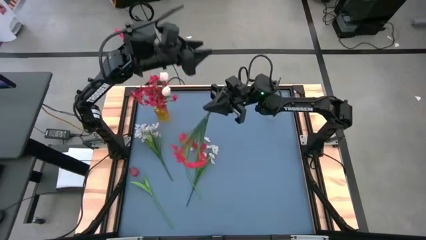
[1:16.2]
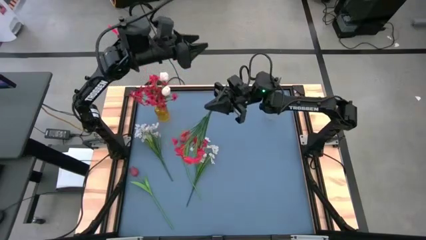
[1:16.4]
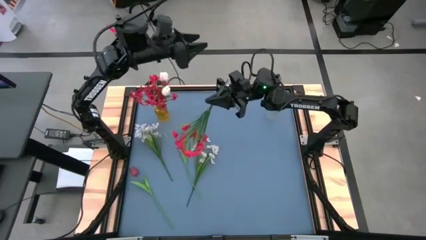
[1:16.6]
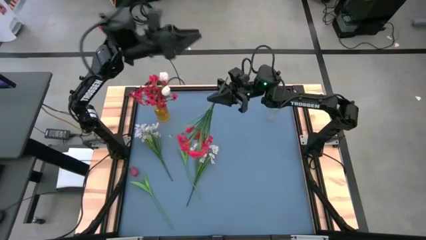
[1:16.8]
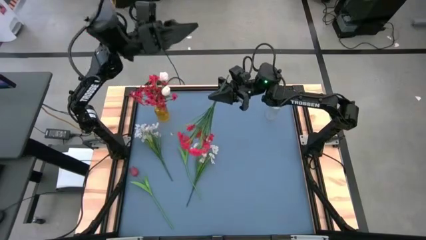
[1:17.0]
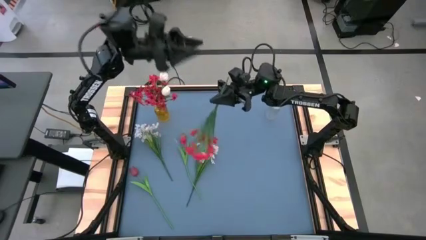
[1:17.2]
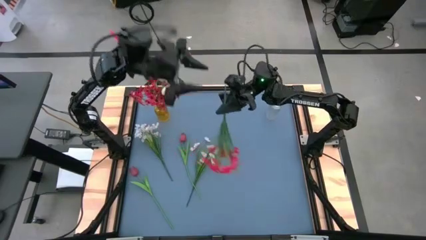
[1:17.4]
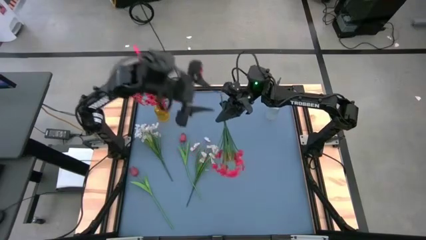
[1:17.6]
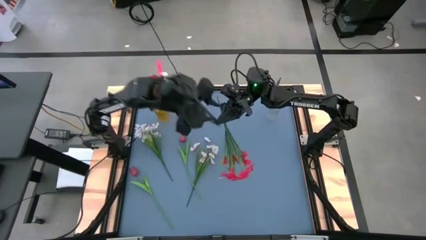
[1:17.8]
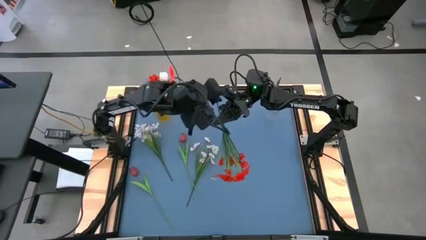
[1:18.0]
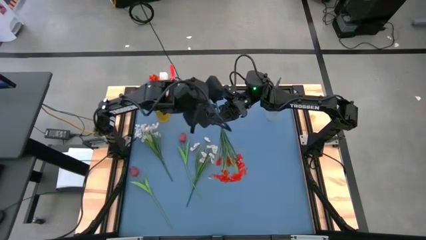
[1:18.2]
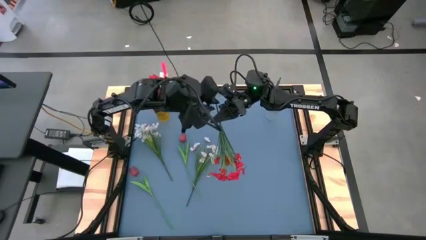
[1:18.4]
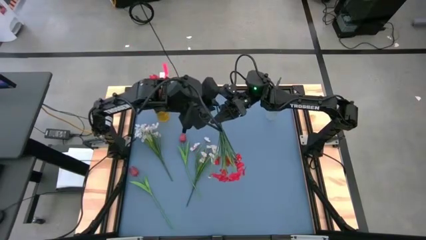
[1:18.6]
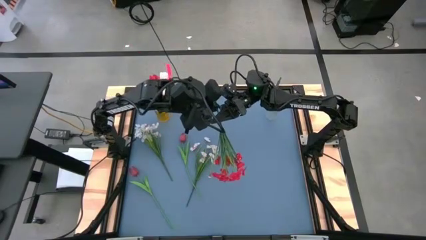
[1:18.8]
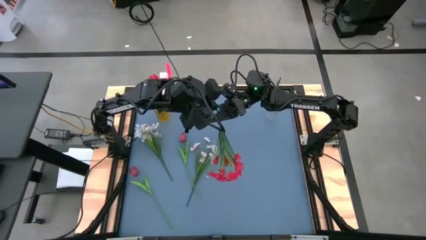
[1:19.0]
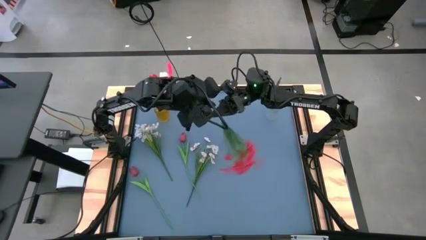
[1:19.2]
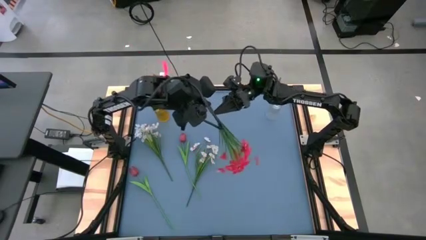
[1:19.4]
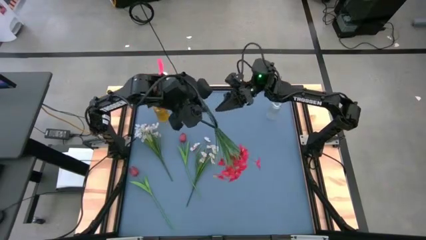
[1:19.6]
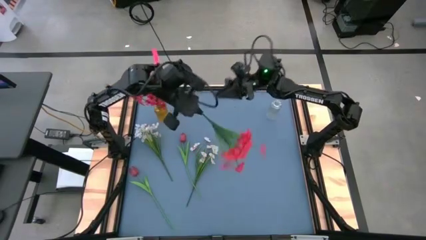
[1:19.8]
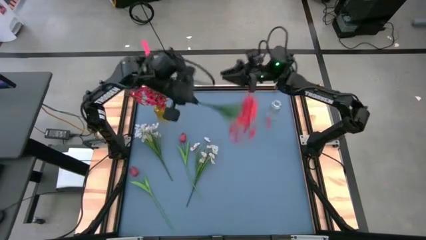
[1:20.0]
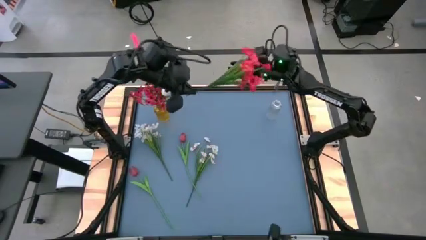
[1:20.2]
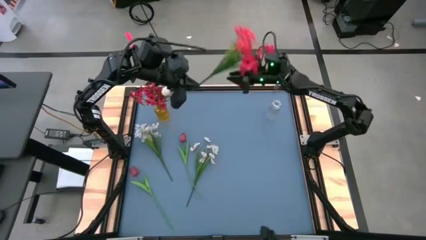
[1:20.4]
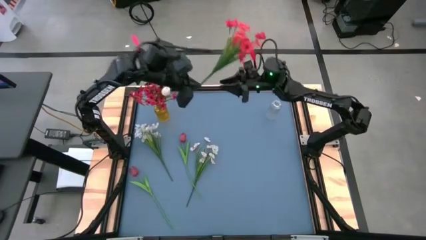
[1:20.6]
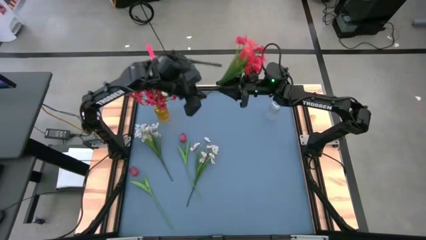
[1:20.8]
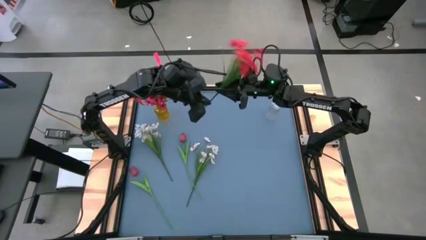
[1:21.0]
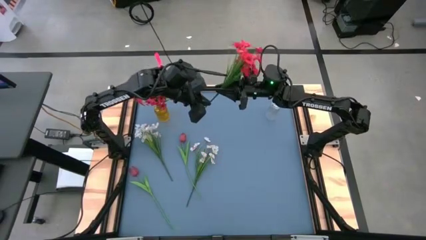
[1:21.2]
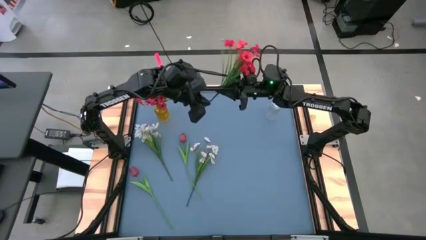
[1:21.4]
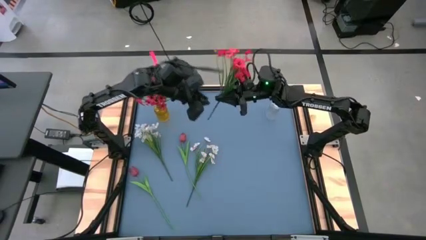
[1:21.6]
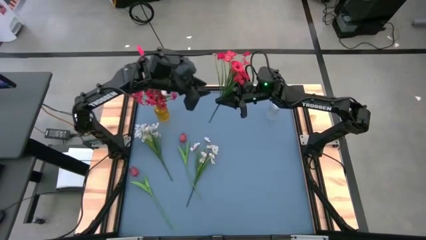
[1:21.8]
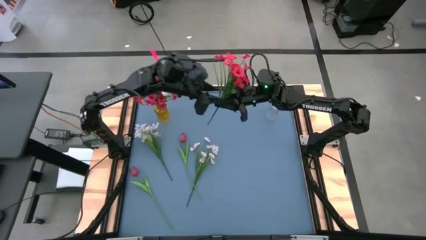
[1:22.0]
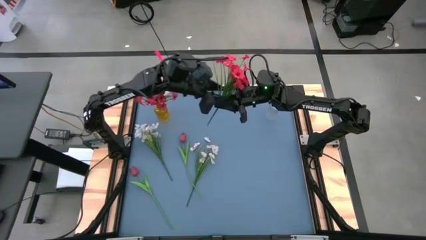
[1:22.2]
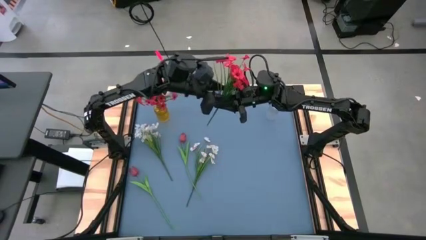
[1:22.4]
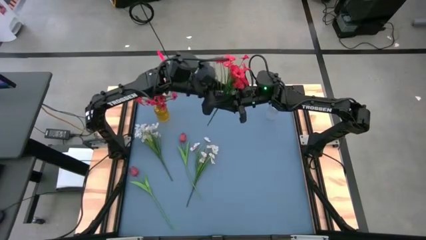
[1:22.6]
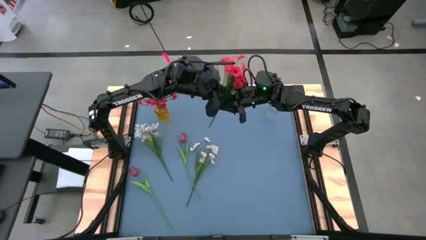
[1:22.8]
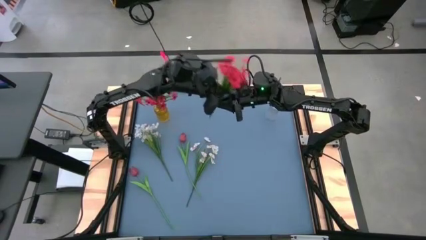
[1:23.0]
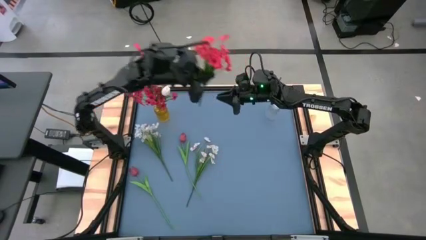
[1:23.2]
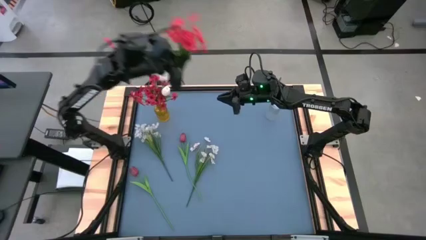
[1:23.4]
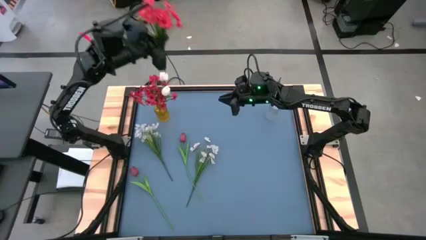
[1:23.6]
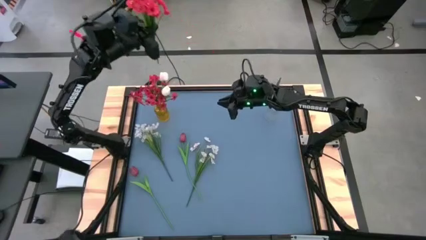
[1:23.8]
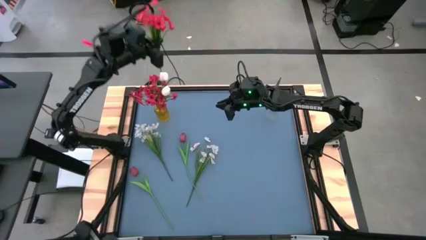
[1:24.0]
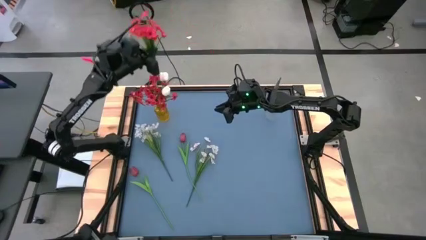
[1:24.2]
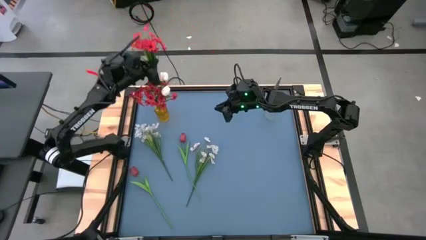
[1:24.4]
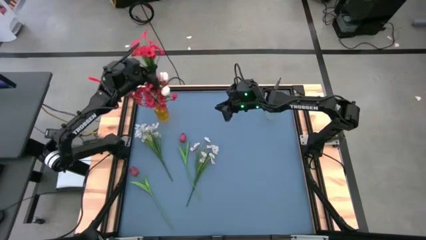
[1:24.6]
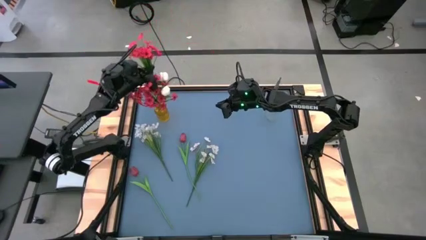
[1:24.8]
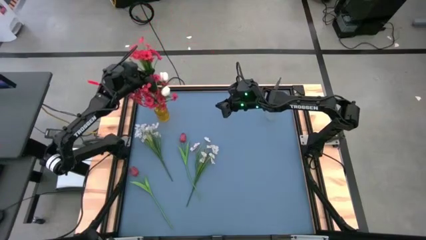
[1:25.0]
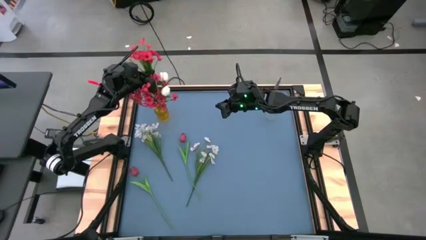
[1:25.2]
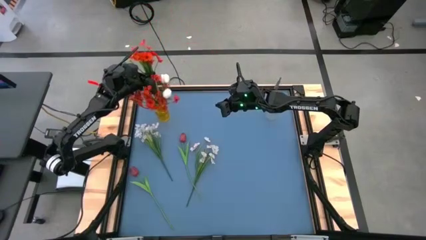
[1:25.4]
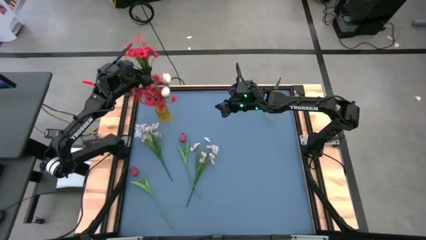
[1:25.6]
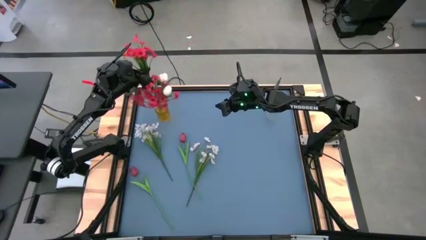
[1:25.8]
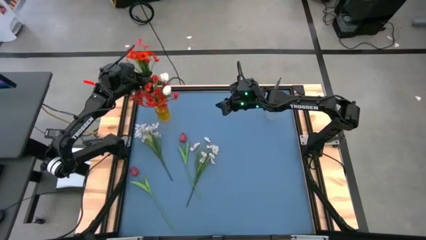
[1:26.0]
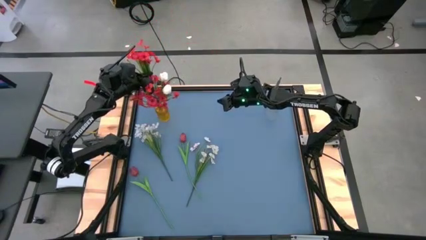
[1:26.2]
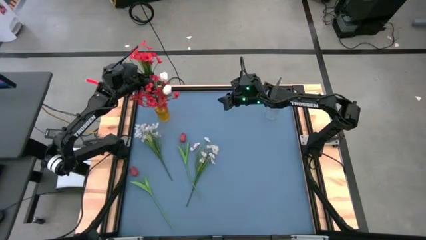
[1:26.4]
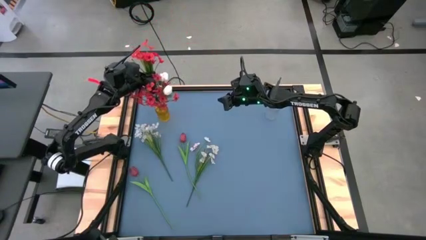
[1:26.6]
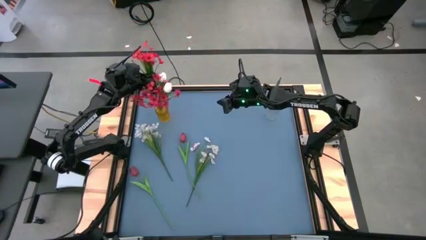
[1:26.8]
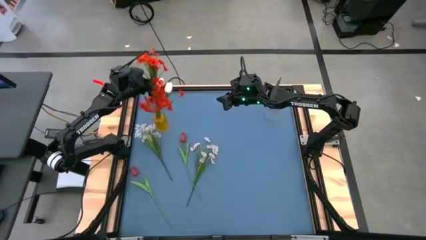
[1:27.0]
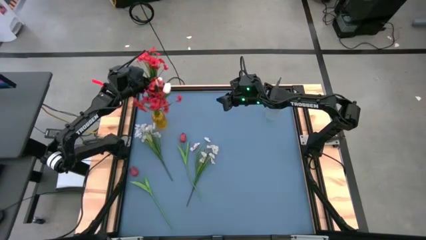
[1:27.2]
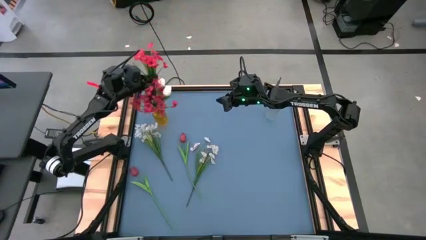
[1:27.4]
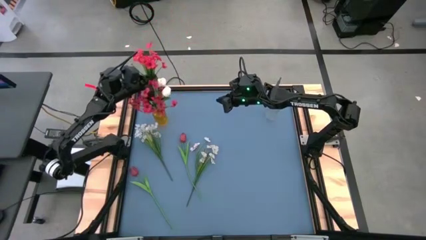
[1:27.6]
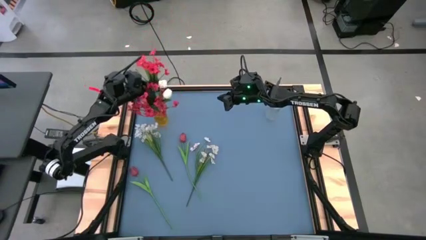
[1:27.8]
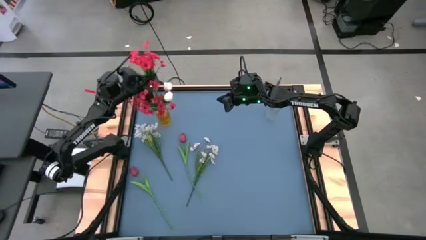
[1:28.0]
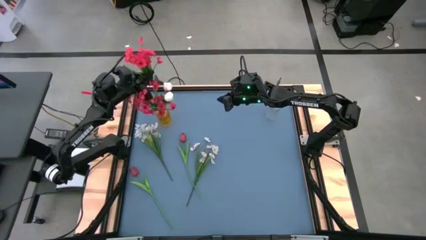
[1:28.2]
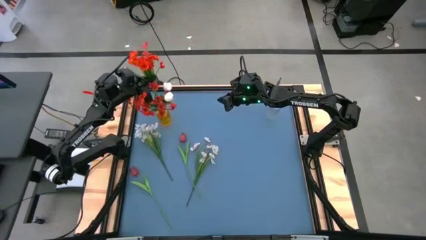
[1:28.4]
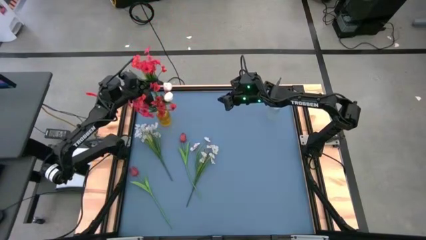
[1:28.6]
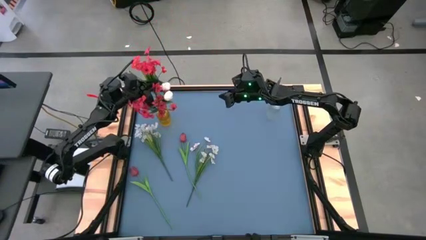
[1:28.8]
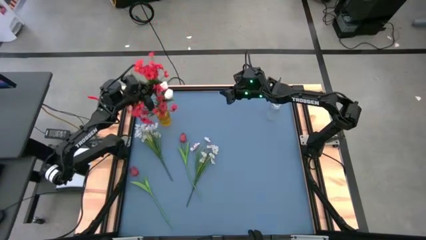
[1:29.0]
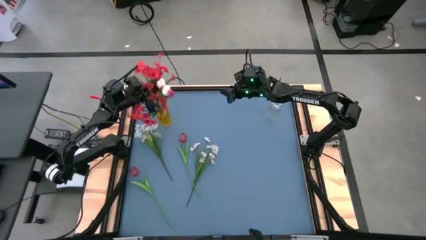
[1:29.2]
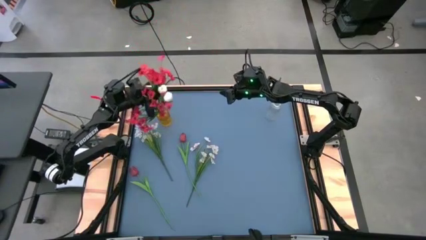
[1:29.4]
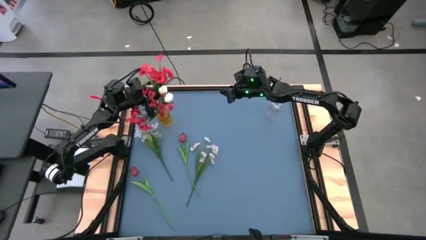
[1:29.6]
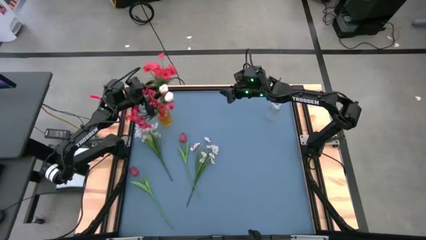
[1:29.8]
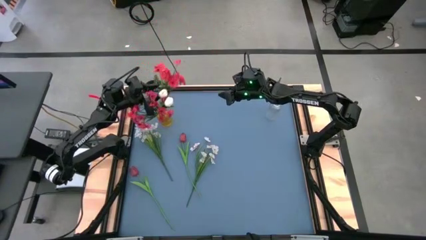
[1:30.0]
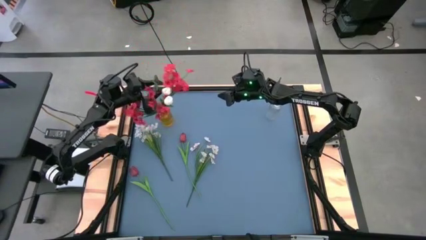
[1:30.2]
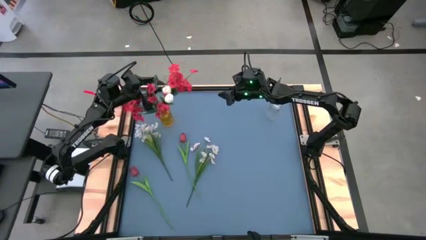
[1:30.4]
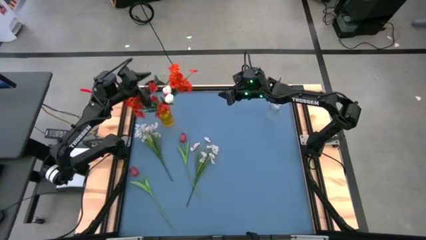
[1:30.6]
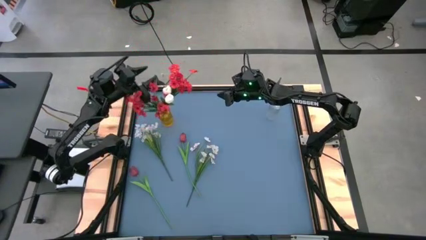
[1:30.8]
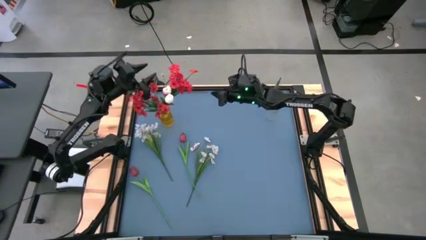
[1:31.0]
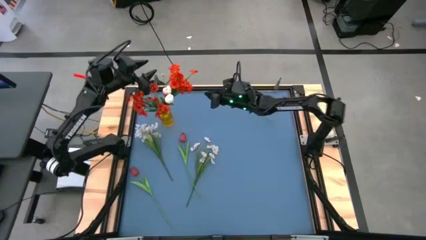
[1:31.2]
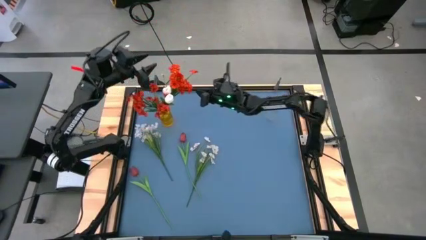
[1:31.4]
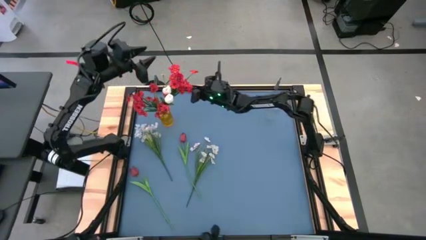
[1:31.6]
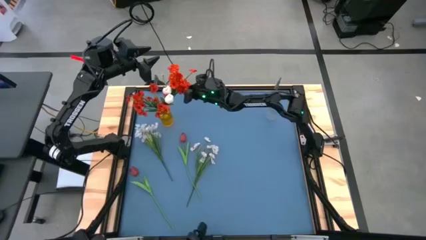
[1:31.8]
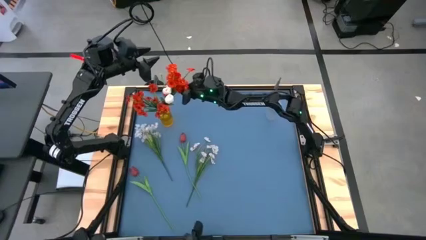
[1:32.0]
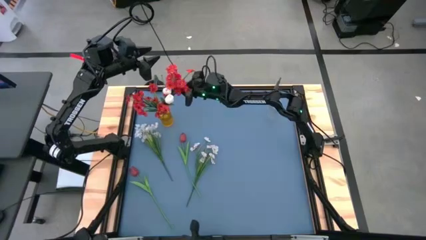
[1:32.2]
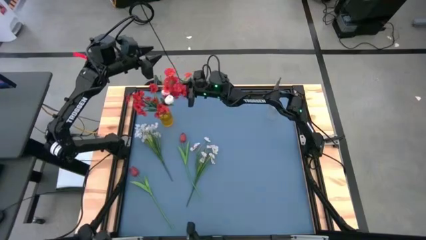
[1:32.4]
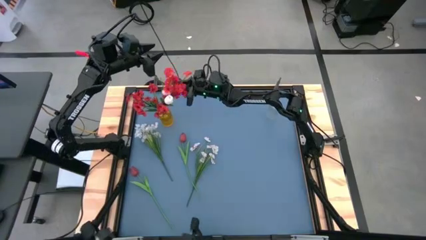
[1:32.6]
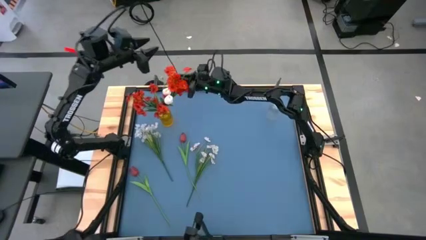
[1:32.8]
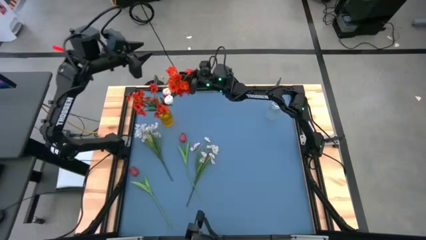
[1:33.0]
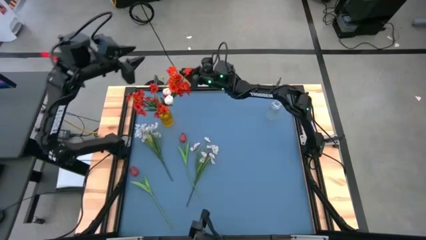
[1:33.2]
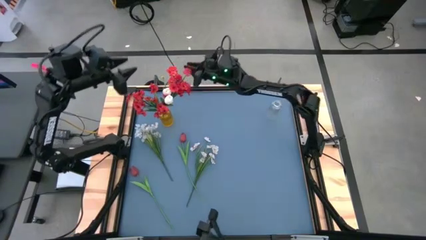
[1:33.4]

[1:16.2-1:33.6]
Task: Sort flowers into vase by color
Put the red flowers into the yellow transparent flower vase
